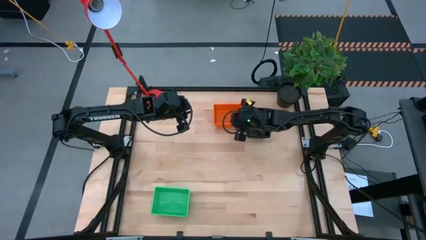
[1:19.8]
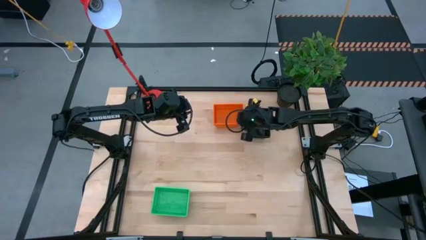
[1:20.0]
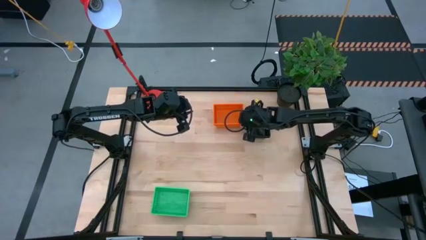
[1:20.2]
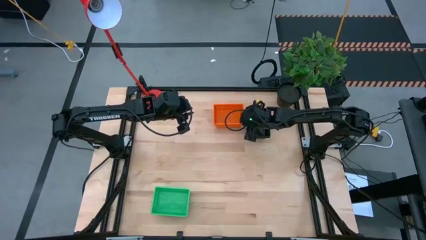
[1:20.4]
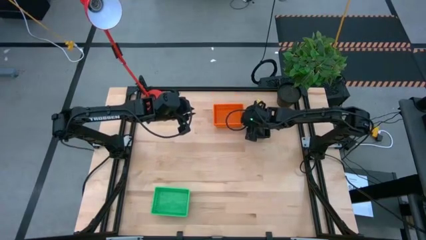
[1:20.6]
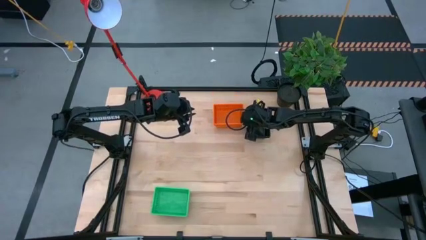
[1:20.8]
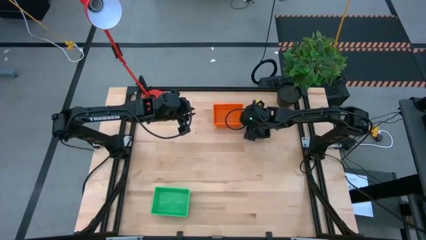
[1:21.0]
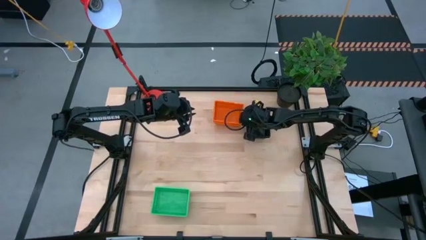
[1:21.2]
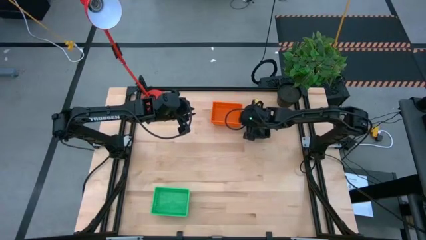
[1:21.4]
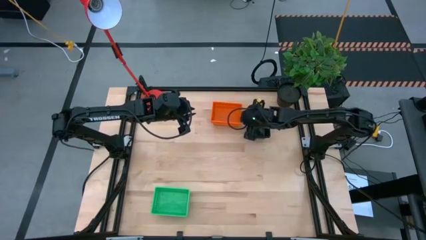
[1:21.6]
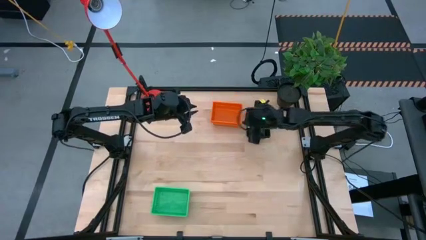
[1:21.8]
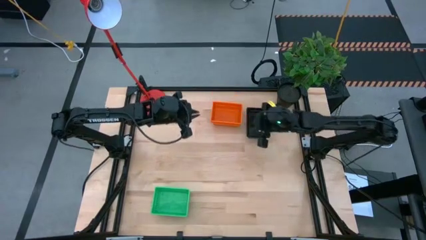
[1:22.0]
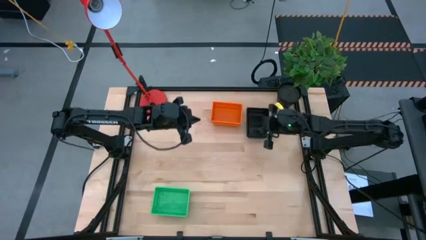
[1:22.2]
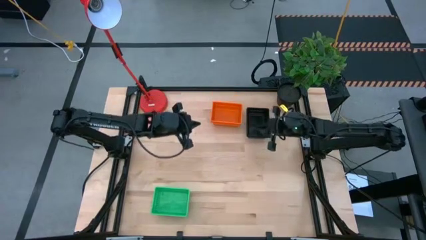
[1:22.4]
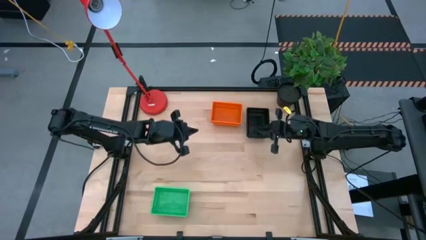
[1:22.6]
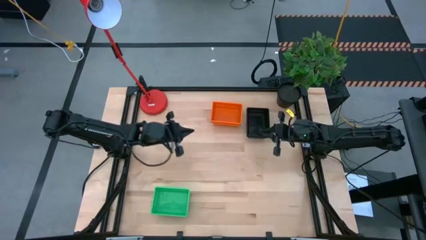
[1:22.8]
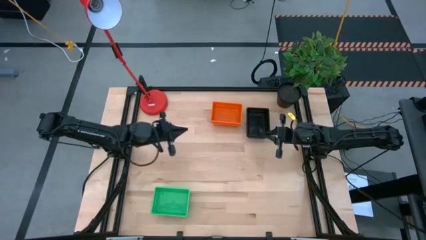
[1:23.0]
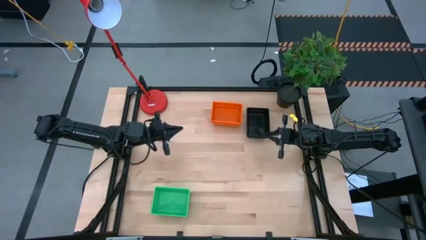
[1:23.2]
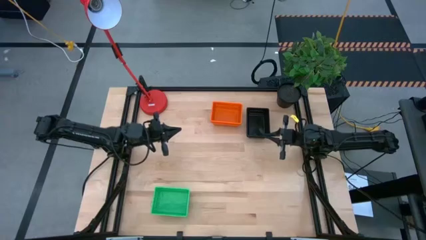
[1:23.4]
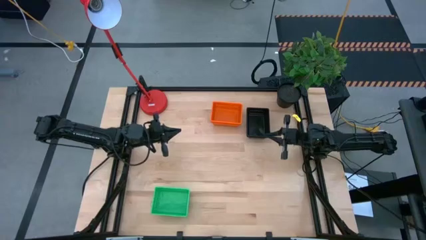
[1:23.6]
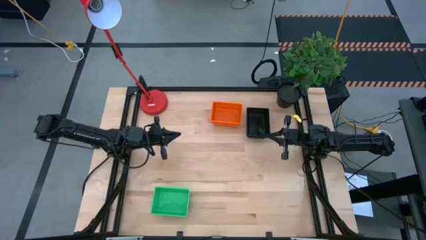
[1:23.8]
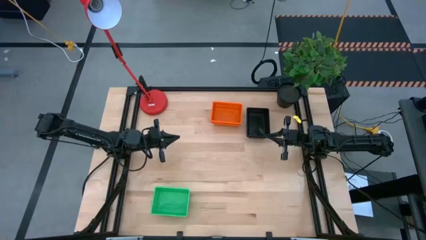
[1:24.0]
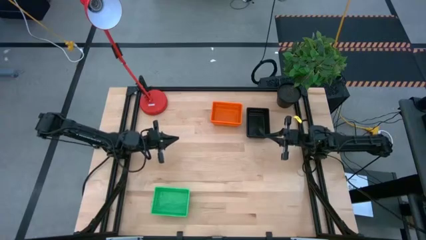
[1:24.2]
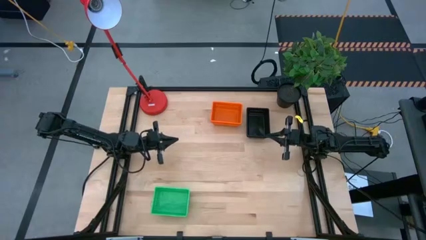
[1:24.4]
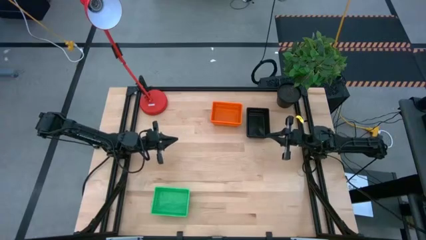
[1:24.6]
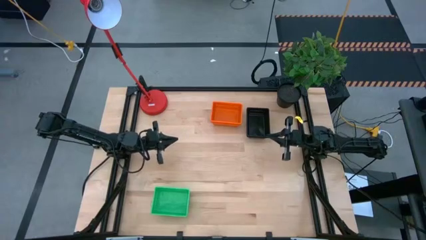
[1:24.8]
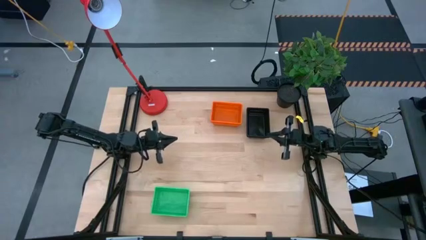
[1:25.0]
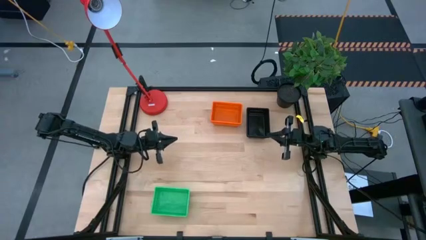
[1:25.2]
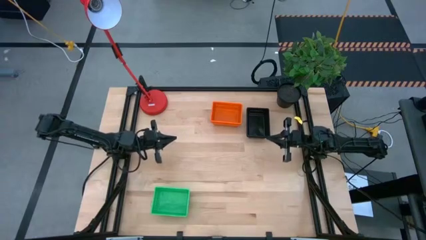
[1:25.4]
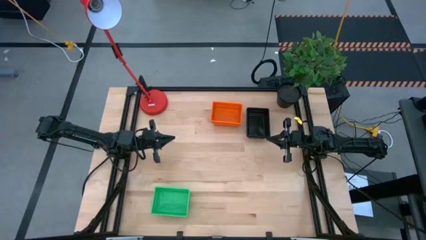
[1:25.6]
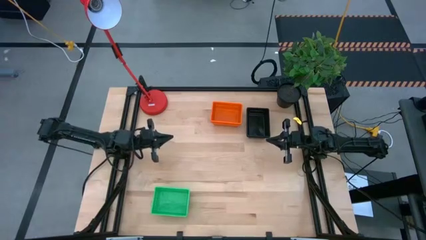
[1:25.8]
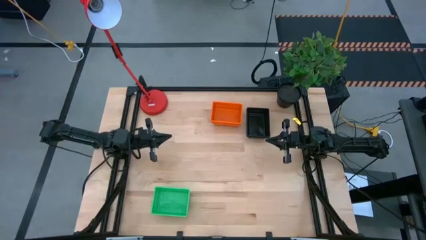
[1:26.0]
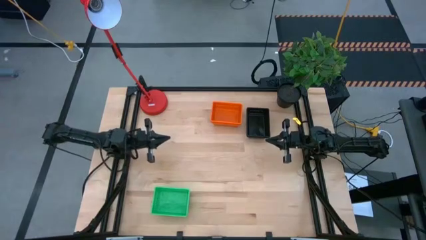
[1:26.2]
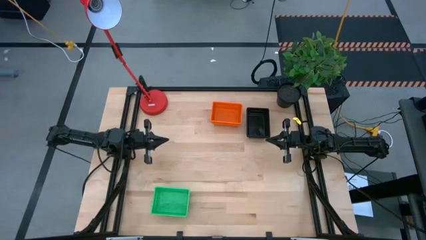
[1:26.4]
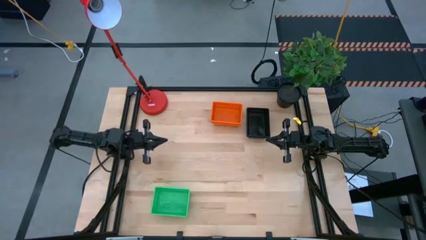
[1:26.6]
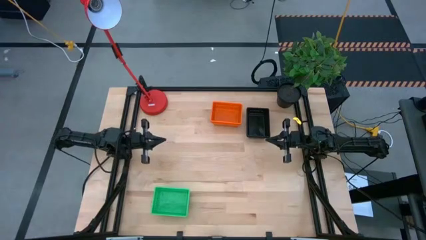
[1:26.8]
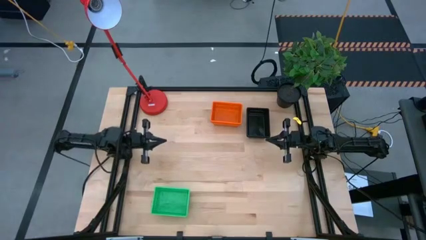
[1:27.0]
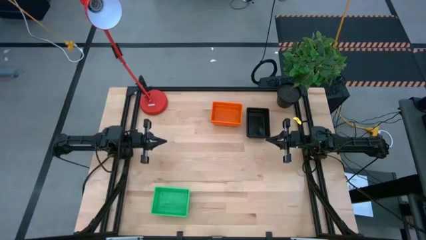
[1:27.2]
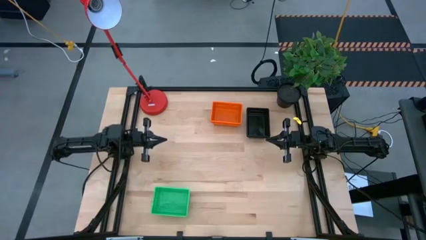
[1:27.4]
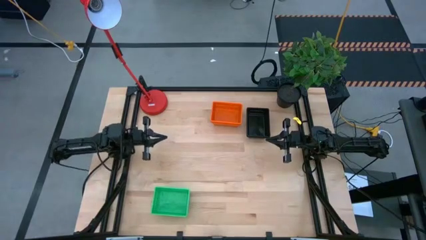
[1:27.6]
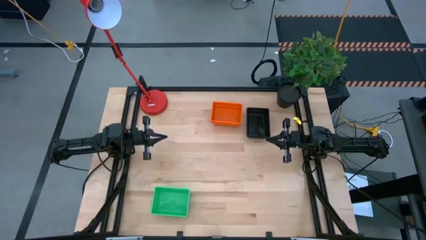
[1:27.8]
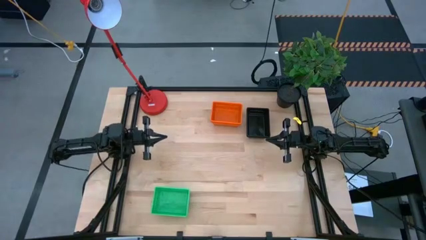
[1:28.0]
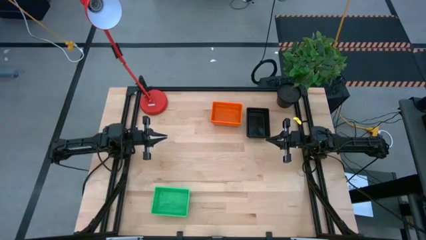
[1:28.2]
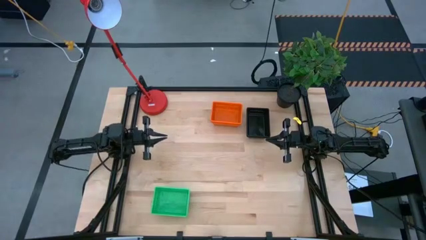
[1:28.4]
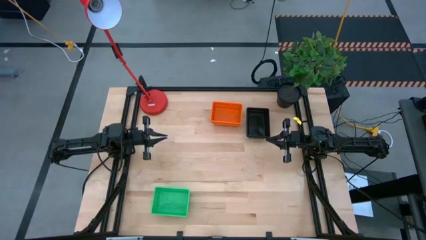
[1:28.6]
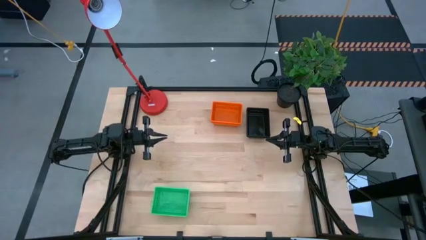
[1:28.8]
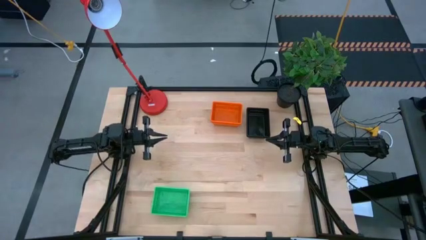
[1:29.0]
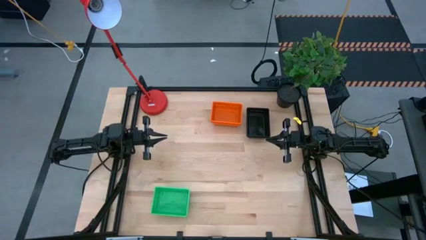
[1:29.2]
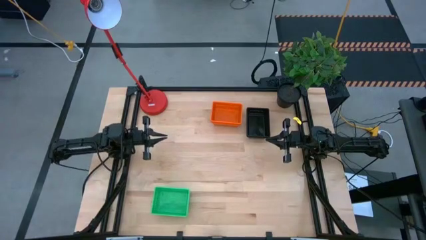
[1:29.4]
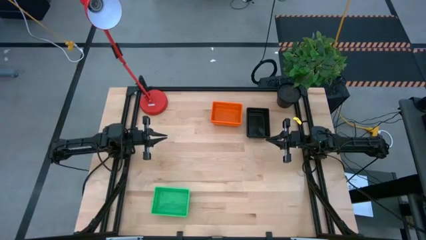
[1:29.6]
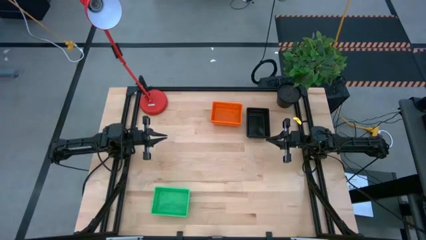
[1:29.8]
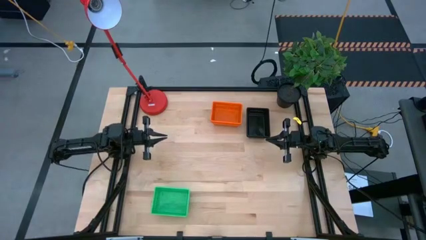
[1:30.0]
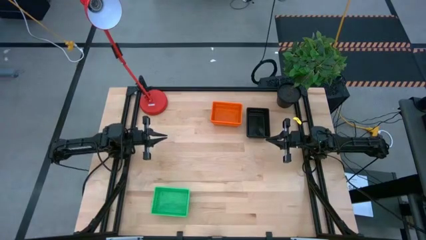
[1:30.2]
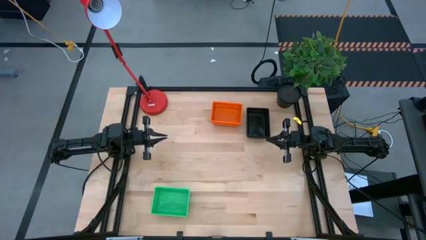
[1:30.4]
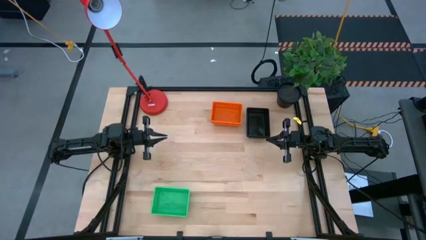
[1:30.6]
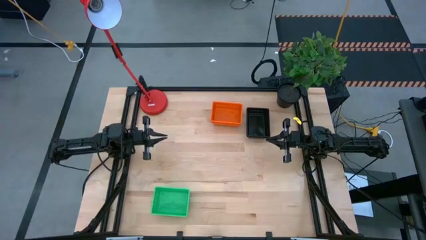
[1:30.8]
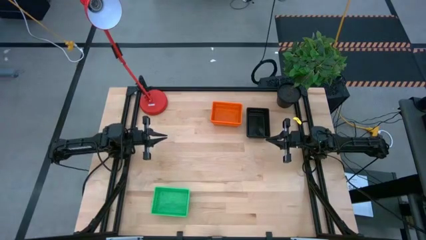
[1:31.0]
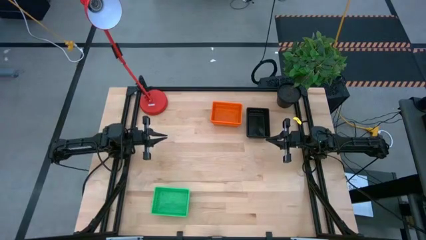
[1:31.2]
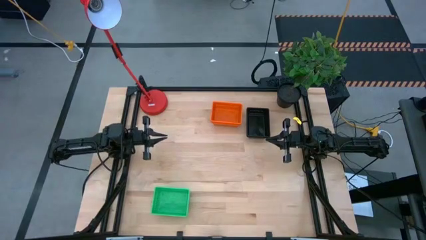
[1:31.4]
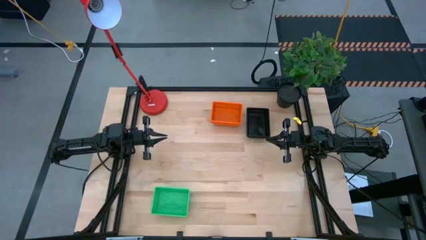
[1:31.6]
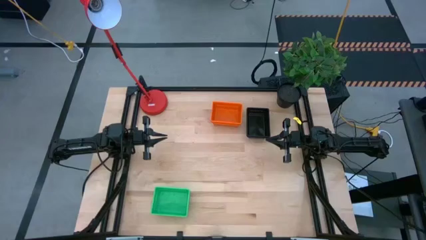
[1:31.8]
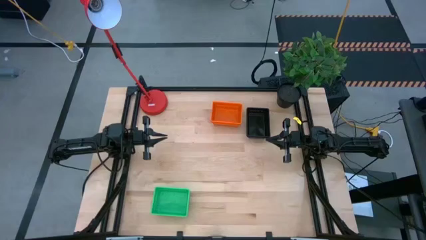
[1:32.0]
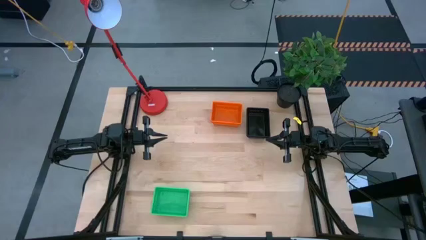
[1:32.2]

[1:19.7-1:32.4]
Return to Home Position
